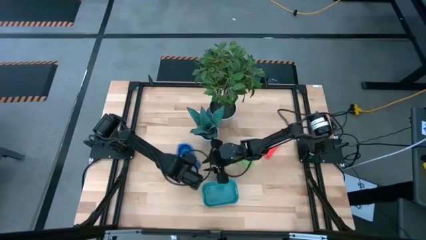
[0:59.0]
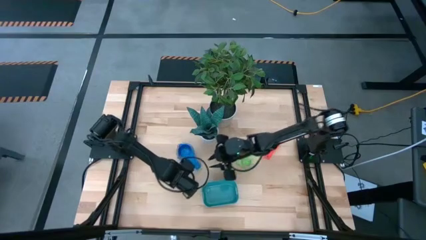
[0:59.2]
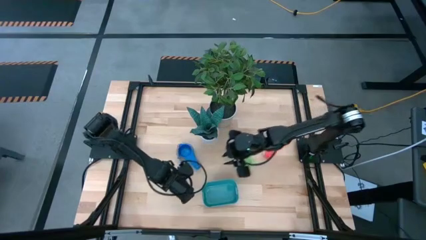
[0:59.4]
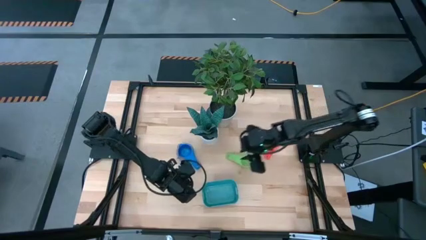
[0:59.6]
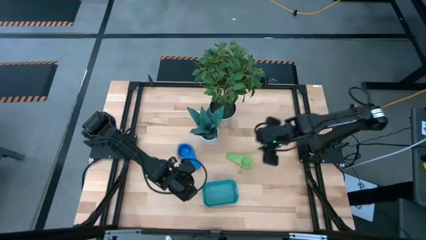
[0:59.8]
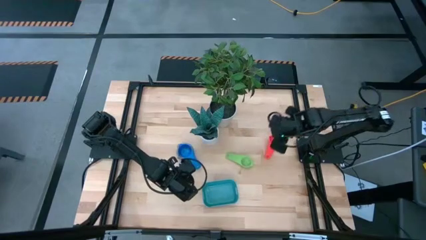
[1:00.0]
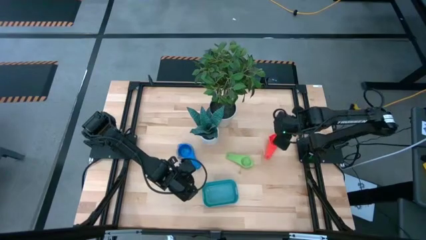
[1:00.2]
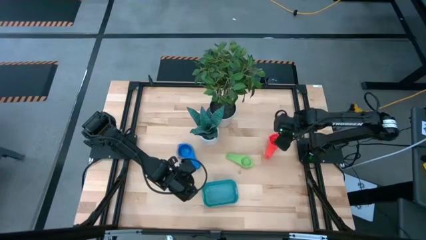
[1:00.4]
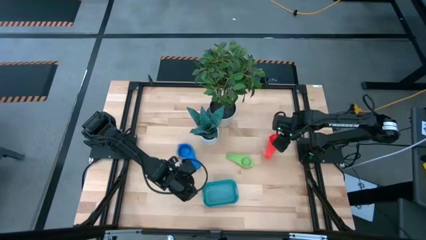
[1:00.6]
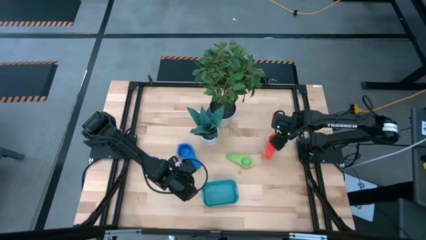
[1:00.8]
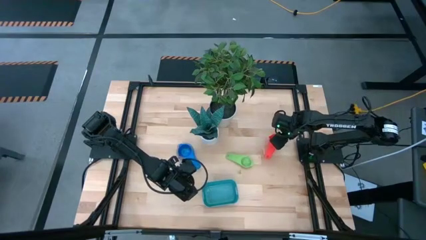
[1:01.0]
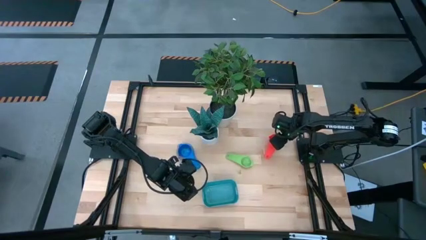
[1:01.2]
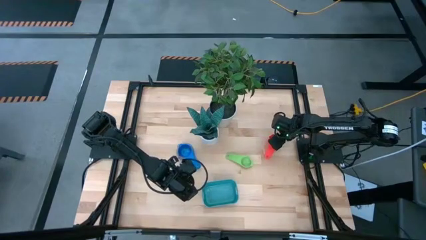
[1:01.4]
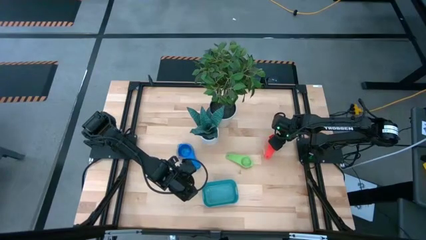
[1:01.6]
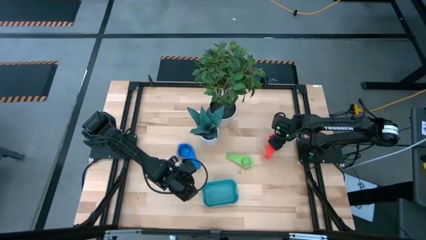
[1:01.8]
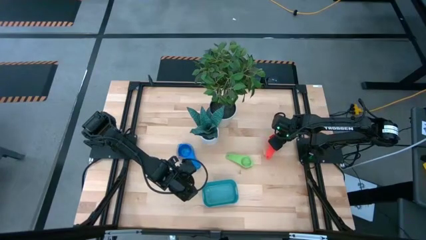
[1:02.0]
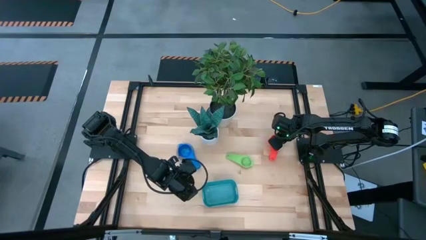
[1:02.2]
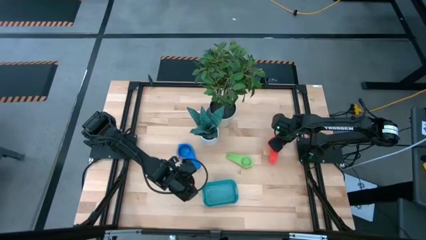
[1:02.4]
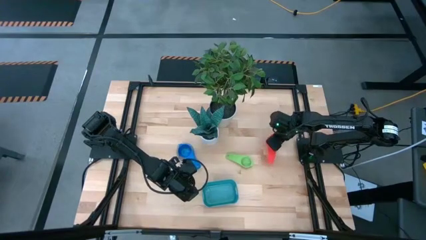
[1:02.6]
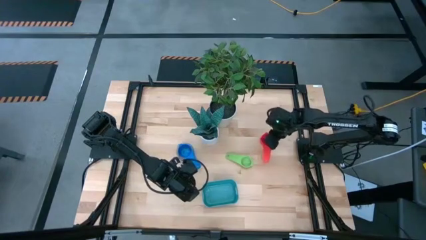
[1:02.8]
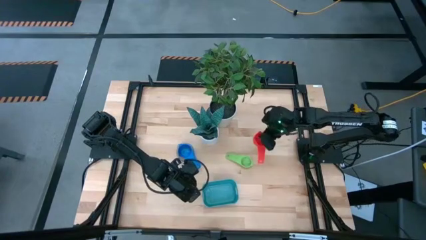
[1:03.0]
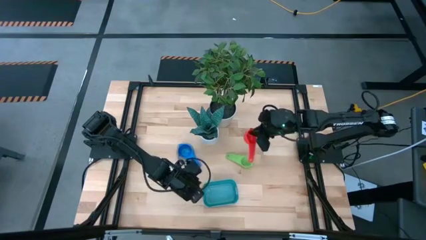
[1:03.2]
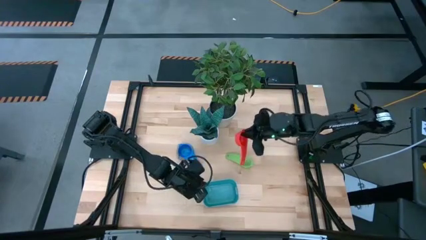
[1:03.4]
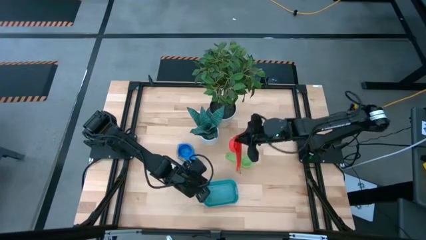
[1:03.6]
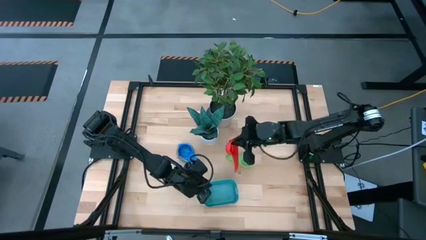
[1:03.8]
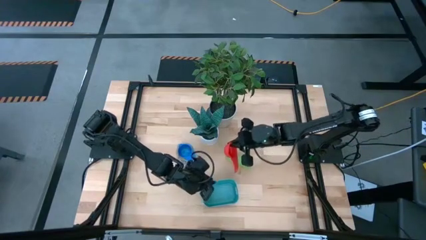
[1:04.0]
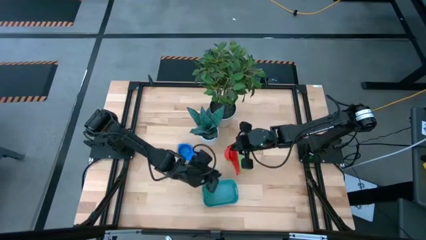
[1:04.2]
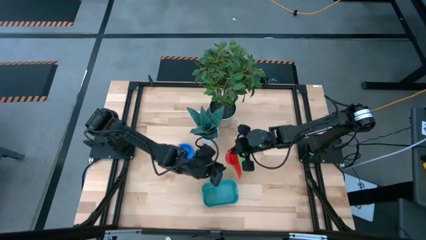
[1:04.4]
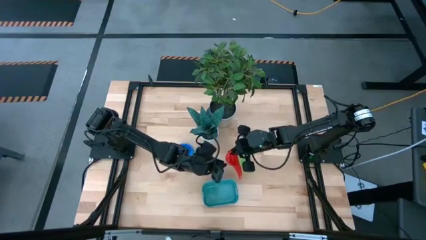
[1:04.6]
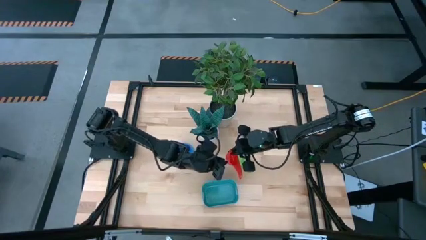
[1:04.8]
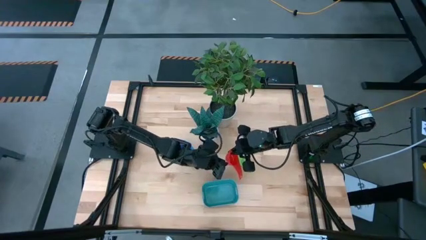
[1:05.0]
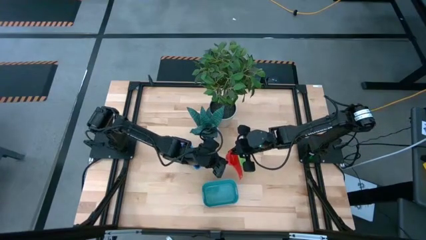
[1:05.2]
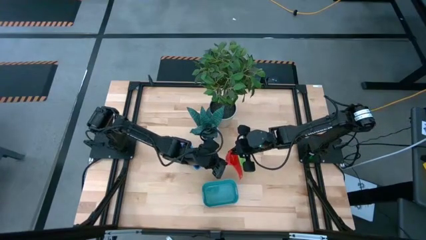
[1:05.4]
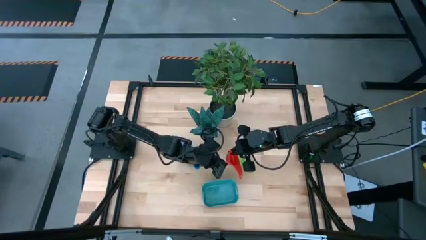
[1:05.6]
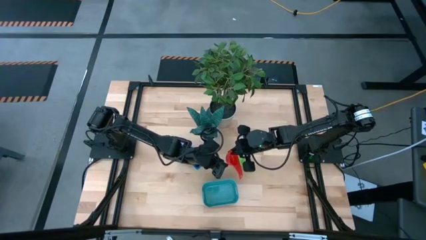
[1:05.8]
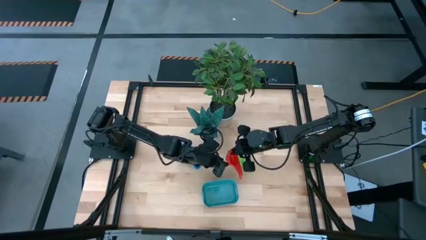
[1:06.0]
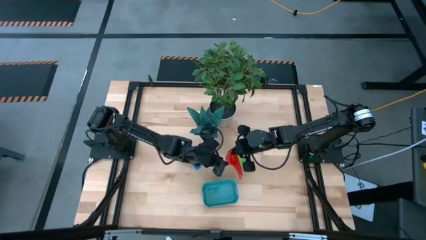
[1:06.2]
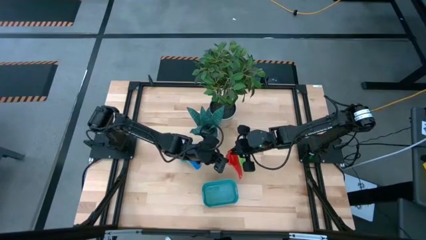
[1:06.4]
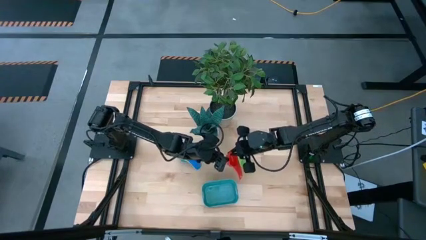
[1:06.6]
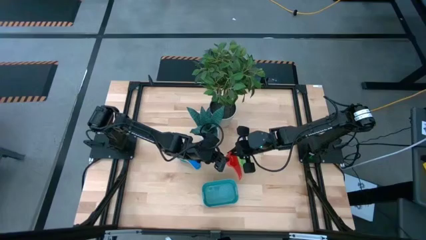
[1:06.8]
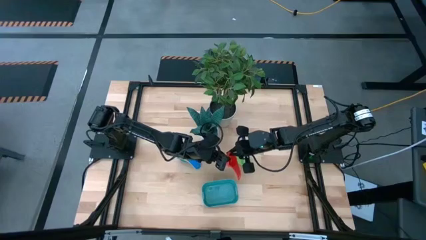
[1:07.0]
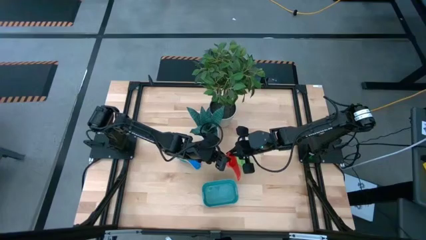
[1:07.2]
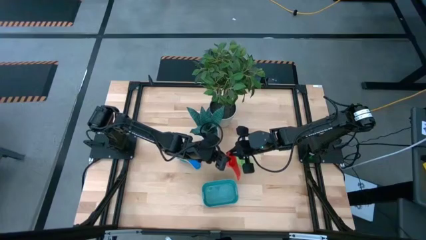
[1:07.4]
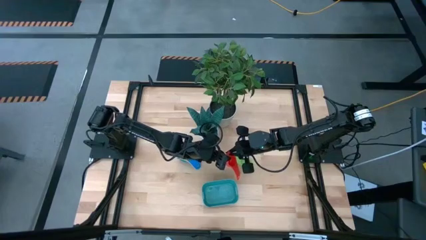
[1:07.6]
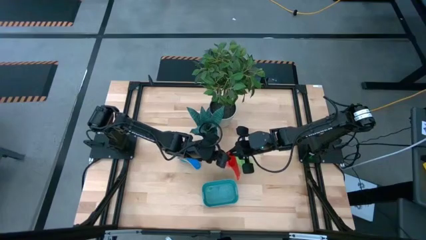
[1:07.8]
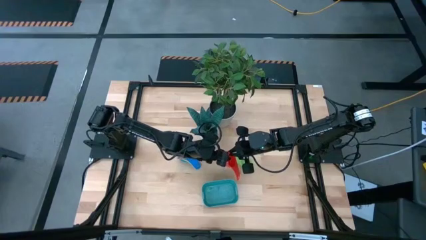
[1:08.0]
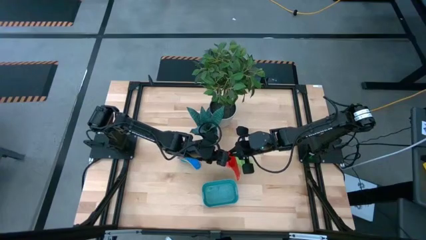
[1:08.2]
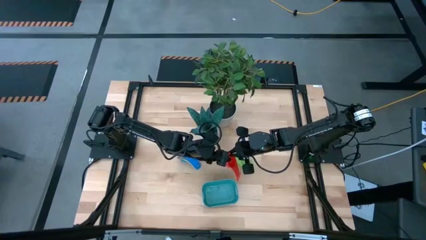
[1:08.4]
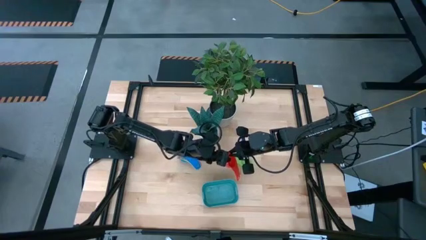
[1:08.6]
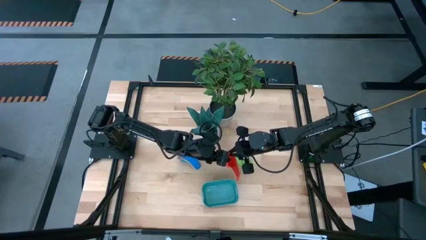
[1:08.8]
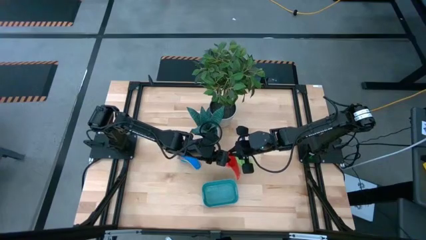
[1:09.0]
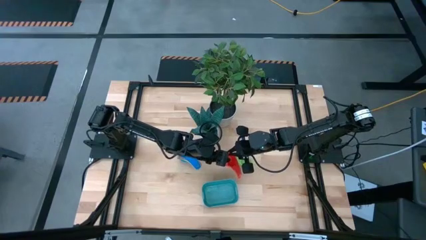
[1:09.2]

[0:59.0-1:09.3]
Task: Nest measuring cups in basket
Stack the red measuring cup on top of the blue measuring cup

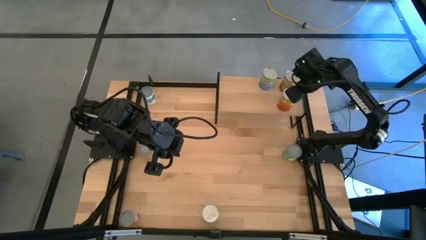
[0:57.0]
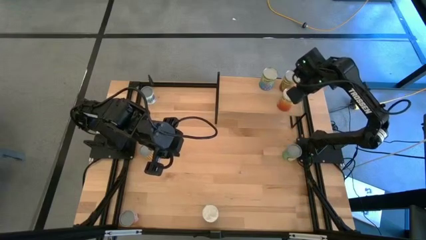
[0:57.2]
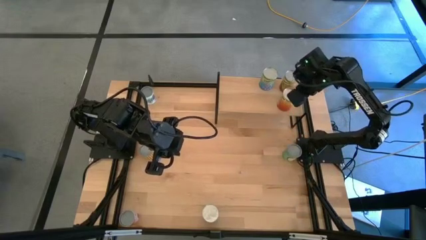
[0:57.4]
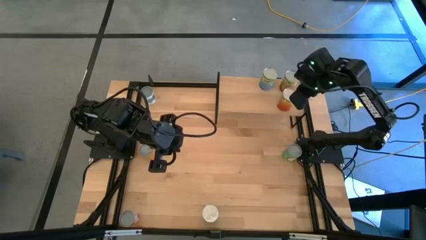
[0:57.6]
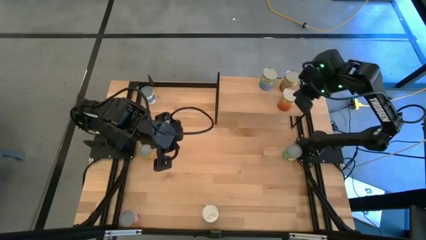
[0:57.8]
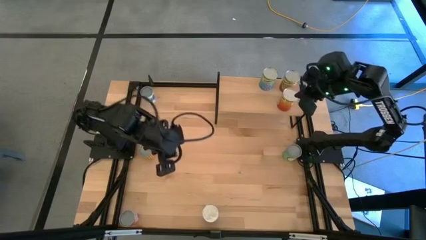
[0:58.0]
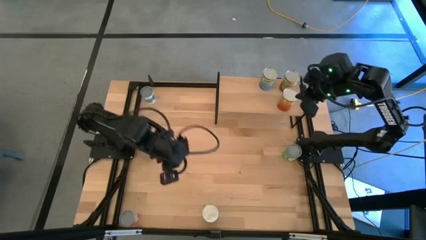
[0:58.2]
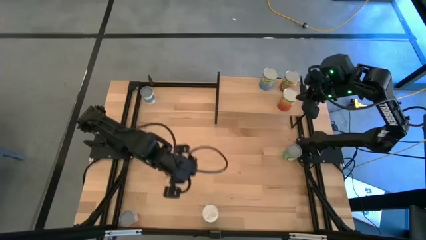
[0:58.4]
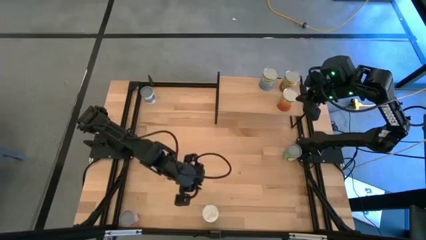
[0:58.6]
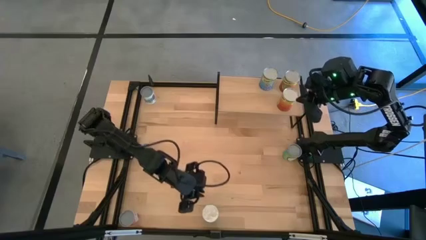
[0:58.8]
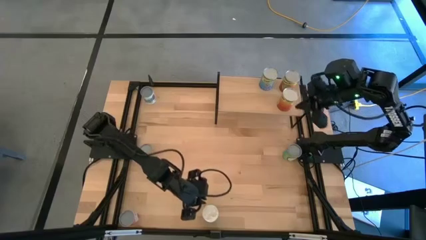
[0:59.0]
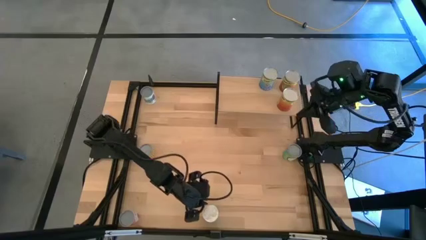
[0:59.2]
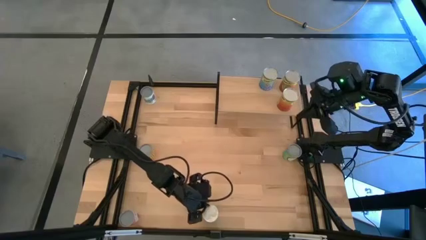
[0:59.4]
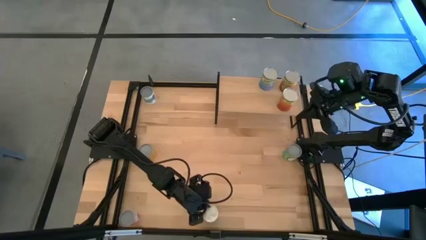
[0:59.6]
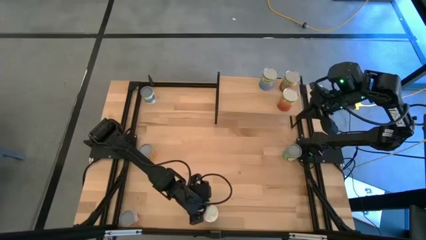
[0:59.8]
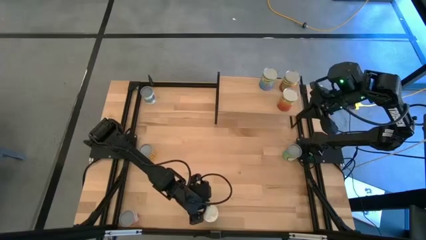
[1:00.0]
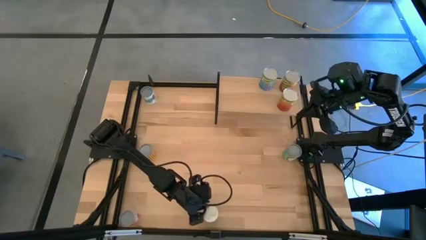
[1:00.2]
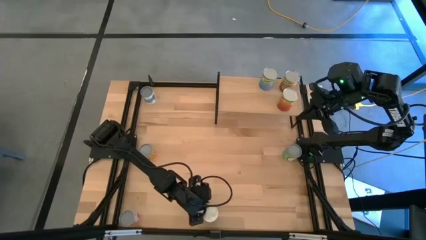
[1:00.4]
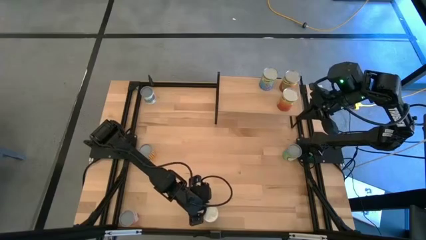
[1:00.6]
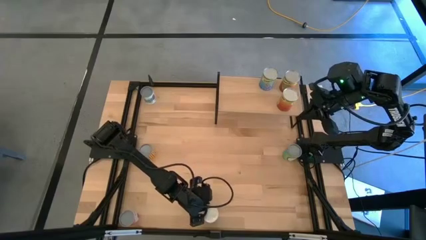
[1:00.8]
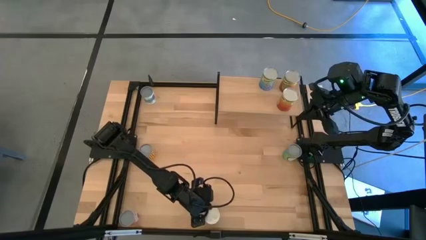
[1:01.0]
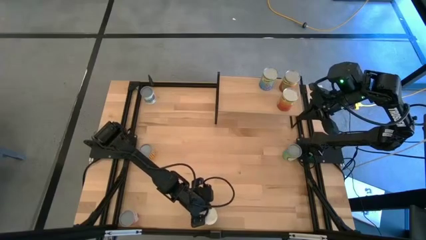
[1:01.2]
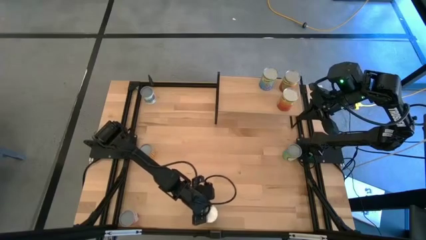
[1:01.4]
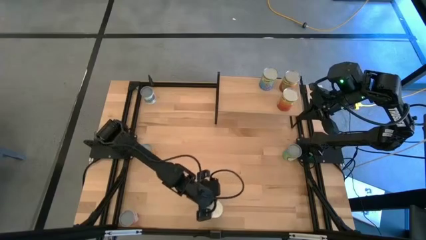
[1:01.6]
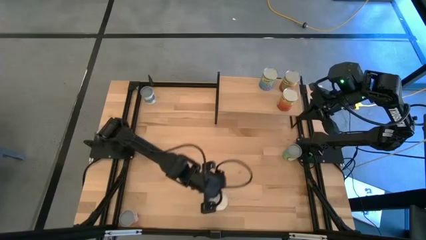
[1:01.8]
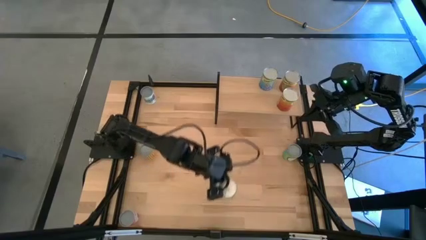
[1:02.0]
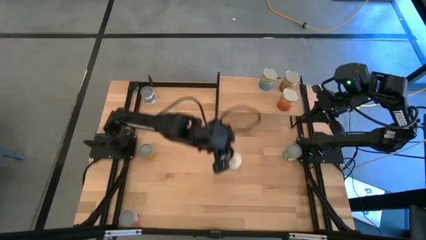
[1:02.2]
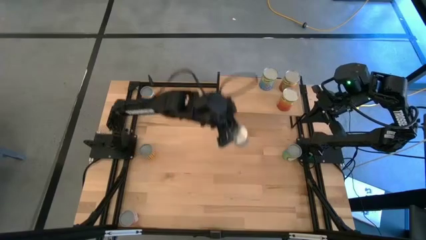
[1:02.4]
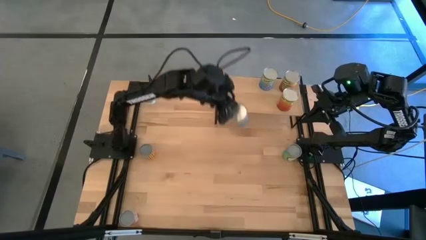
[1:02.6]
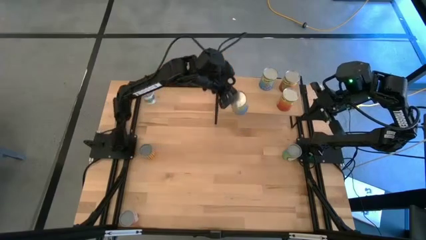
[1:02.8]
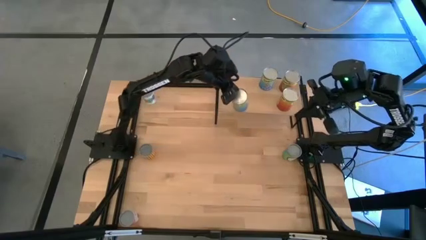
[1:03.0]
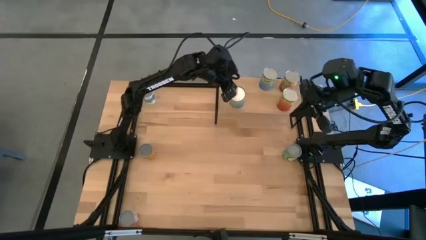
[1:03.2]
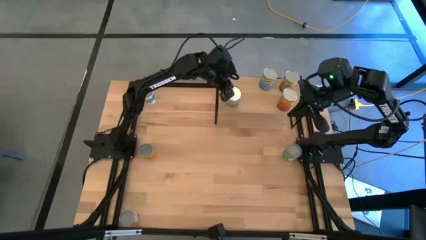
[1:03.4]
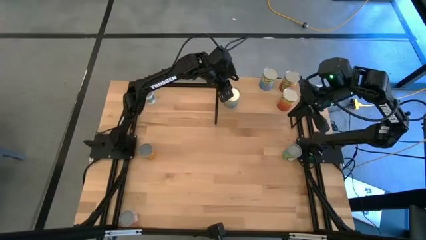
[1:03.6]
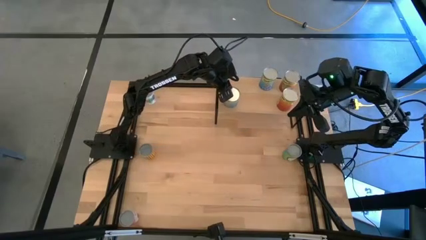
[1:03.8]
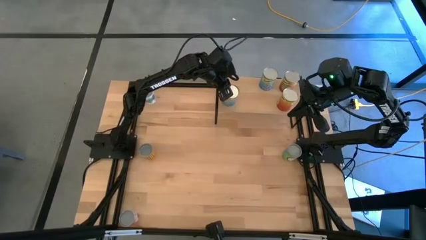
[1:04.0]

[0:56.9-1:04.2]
Task: Pick and place cans onto a shelf
Put the blue can on the shelf
